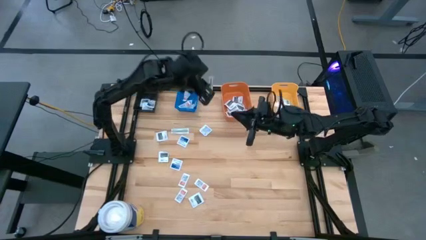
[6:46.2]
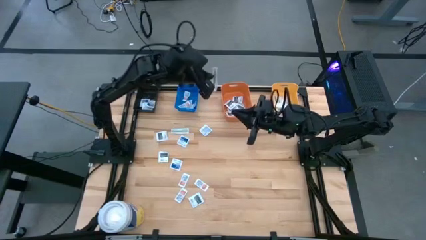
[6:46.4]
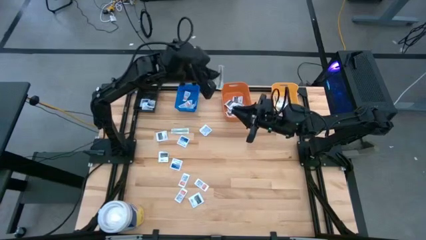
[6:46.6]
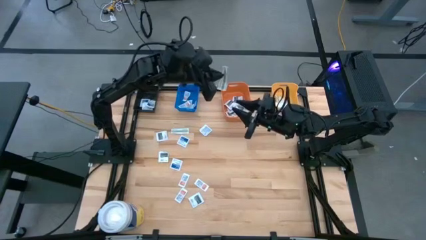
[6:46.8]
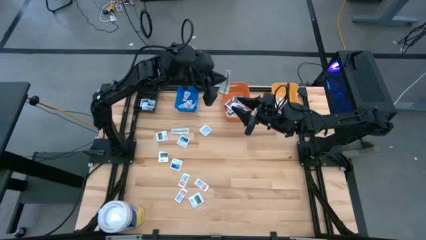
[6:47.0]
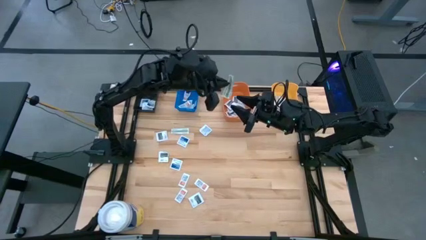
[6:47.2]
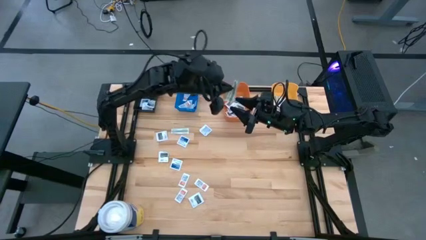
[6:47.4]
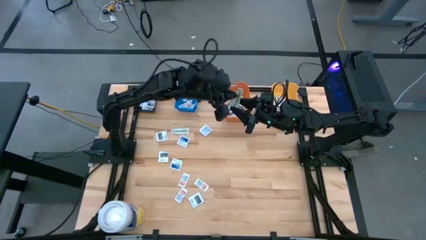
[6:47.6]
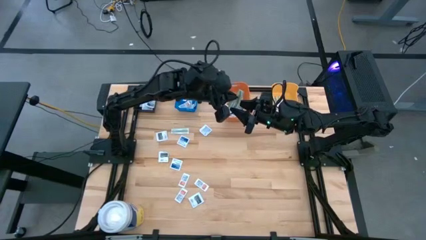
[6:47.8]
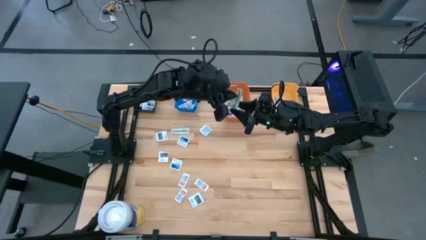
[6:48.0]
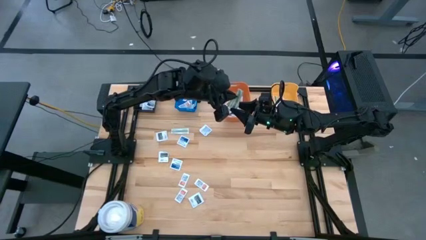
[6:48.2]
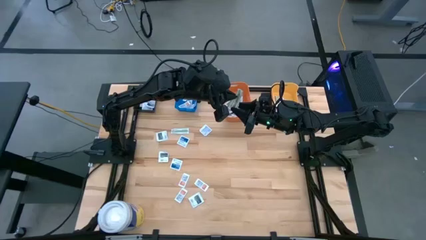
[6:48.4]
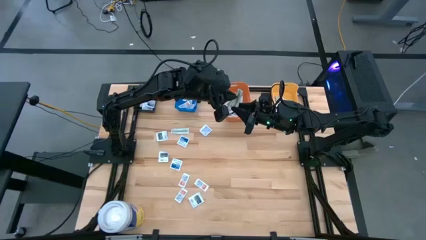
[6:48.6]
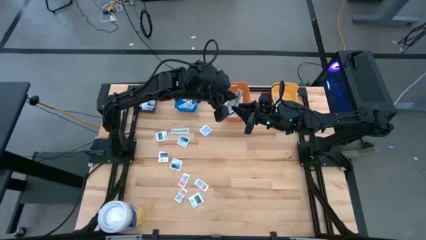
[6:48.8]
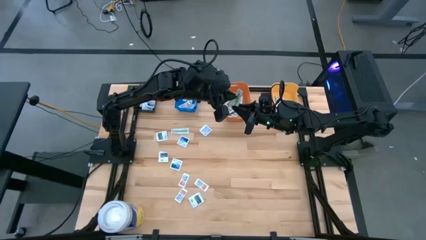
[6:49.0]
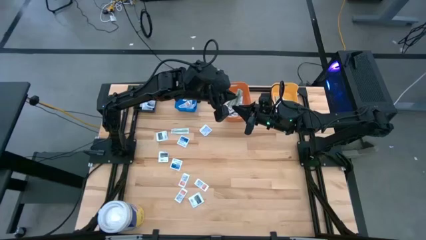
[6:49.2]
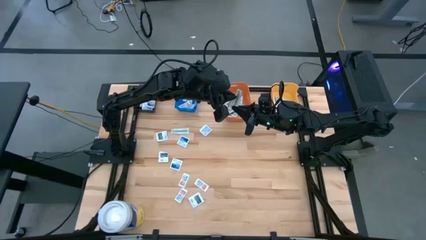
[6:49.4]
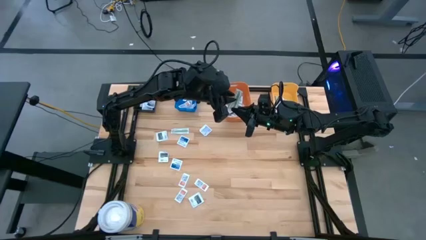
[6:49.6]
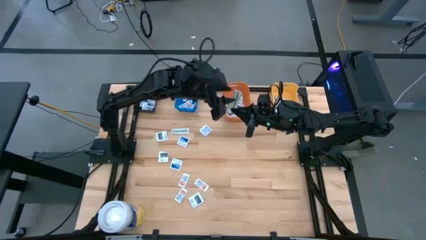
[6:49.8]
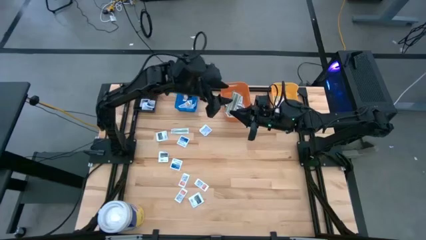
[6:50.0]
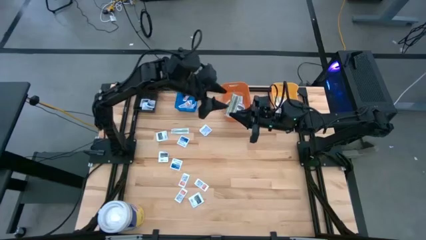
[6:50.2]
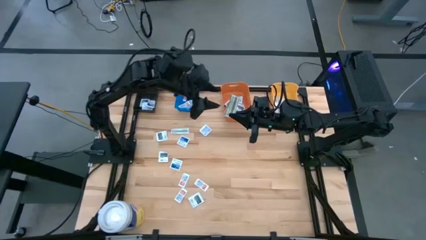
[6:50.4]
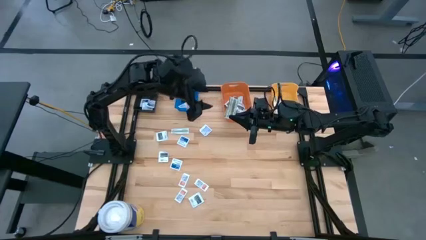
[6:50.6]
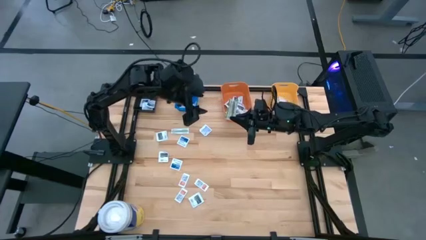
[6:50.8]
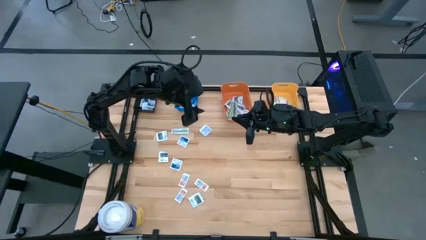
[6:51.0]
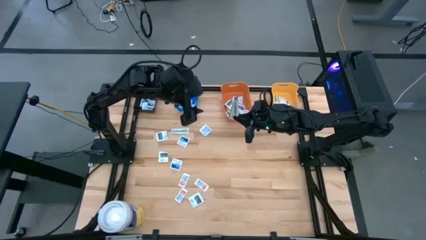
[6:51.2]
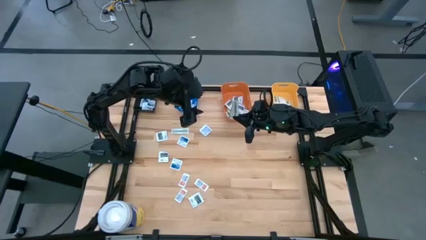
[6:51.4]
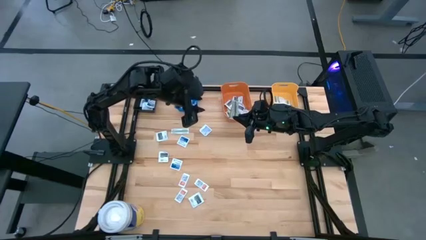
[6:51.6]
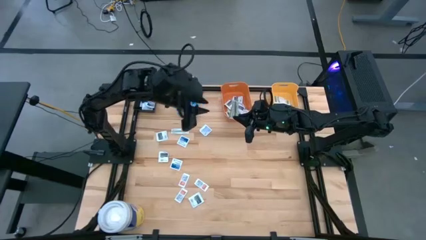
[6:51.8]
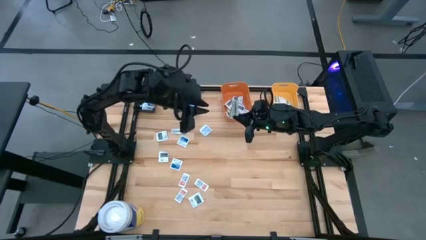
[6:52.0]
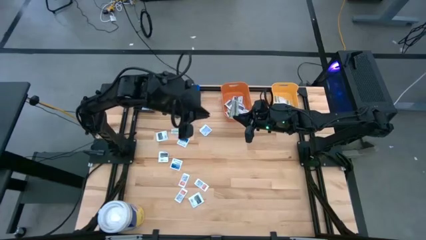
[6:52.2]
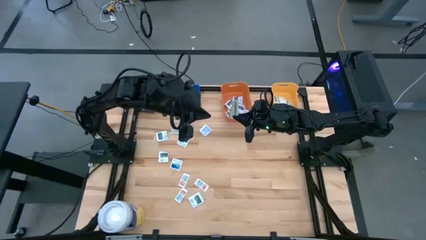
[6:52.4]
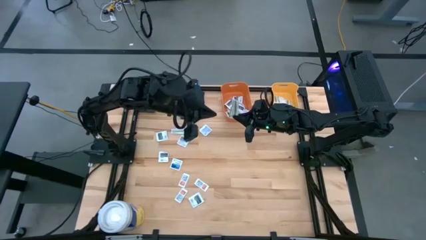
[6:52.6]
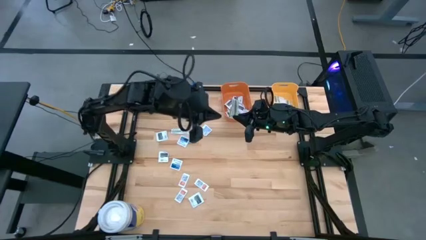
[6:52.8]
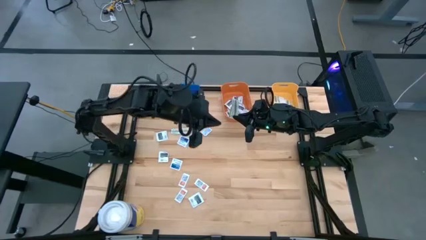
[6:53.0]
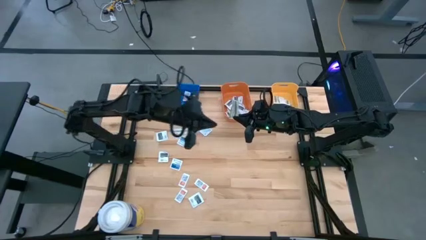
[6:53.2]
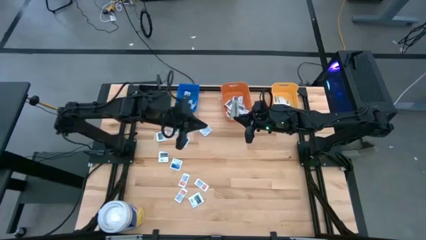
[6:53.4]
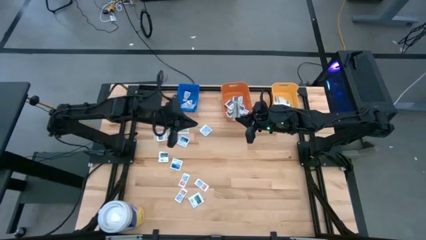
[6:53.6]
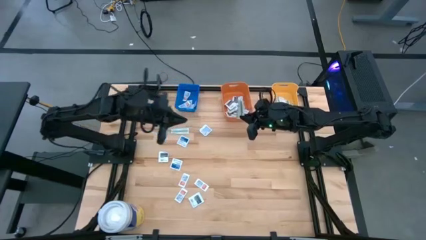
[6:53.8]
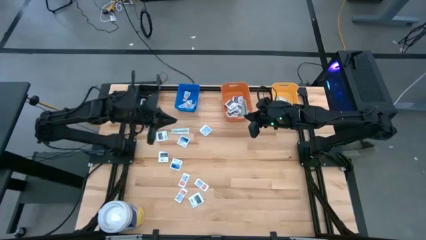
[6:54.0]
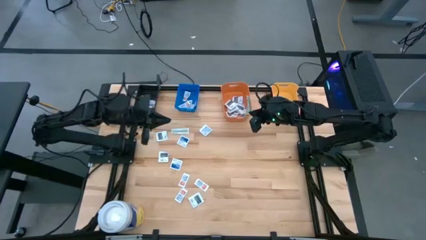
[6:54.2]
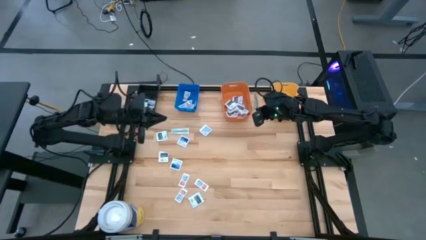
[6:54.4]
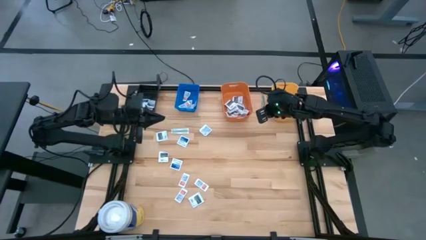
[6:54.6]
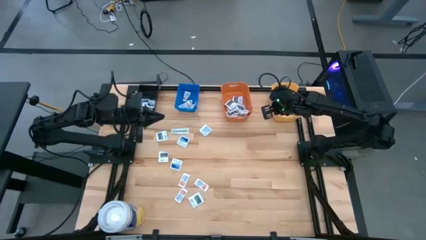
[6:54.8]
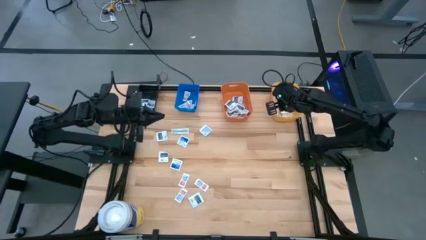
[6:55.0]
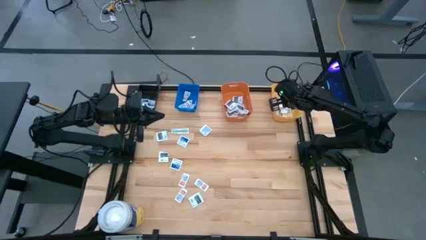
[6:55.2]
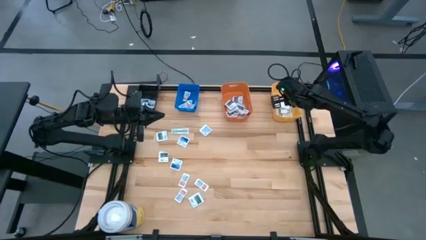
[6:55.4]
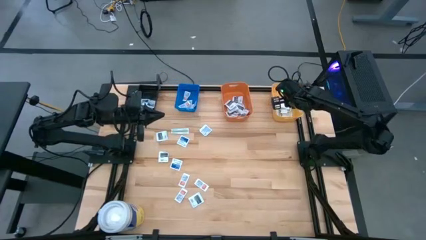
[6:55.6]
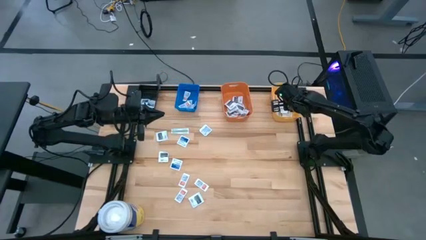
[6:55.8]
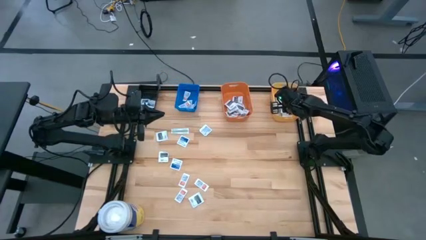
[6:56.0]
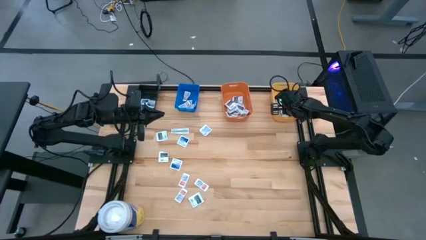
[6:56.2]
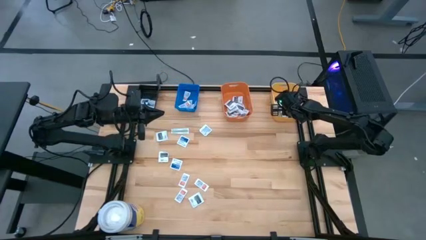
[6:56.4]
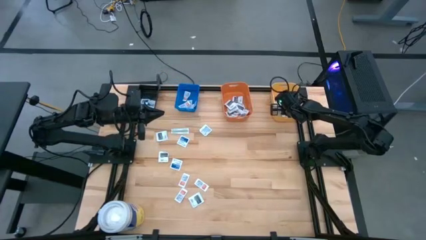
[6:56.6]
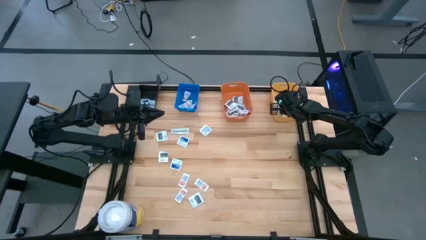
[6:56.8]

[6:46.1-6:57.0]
Task: Pick & Place First Aid Supplies
Put the bandage into the yellow bin

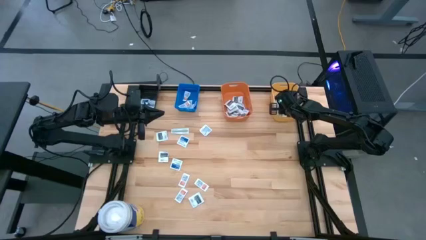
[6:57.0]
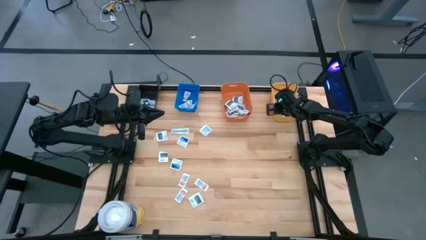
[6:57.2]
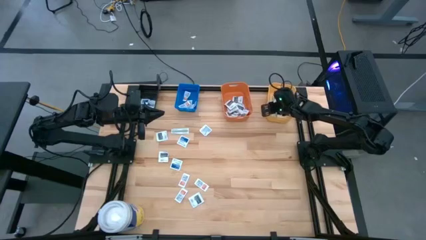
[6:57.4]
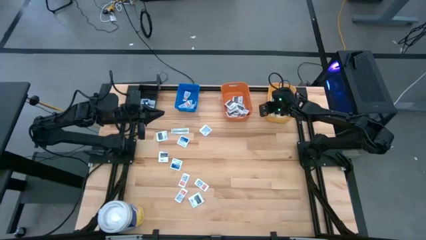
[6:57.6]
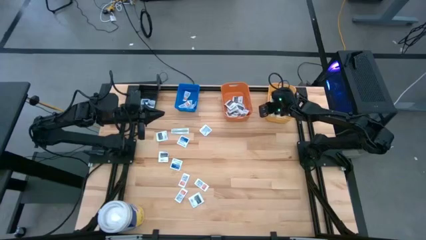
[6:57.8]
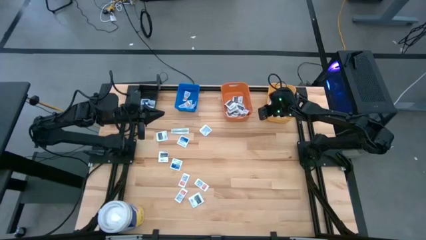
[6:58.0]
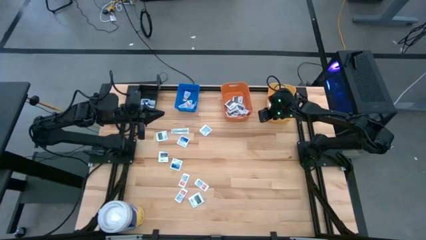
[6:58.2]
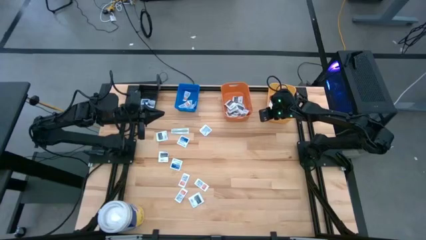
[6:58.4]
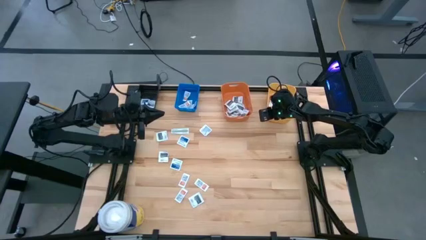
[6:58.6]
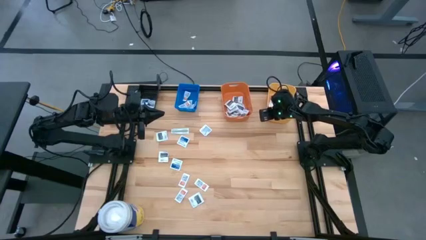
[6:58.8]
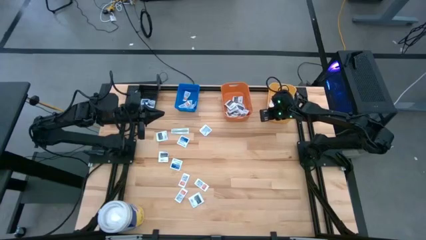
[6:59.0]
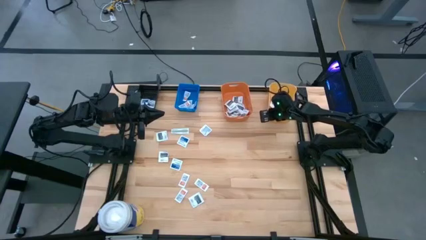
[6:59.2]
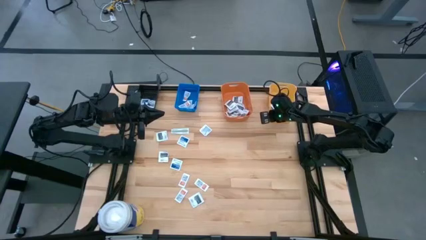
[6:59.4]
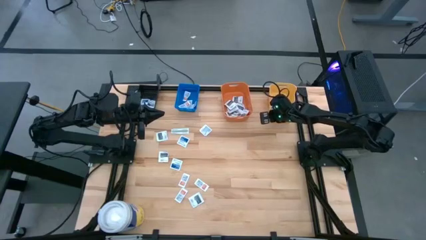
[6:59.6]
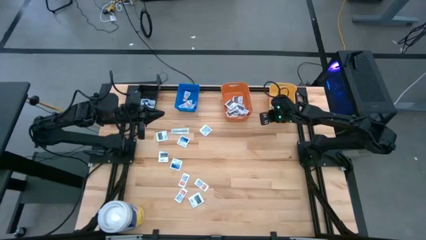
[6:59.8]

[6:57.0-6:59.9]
Adjust the yellow bin

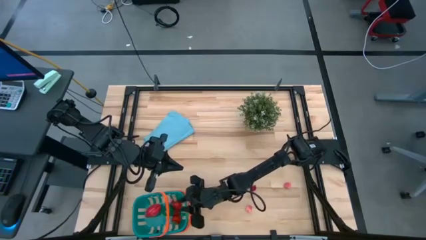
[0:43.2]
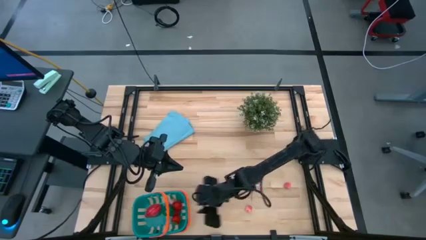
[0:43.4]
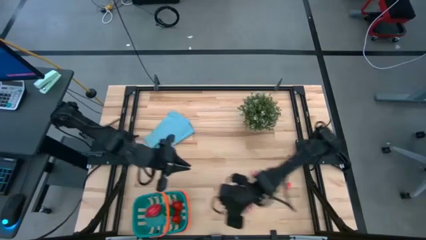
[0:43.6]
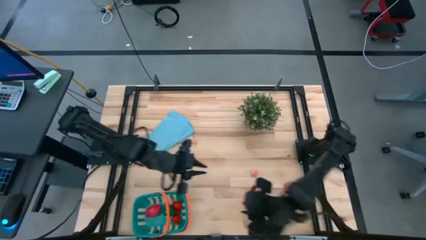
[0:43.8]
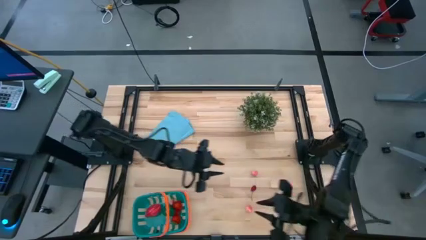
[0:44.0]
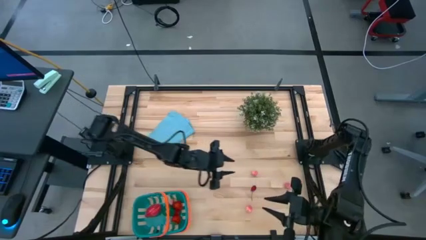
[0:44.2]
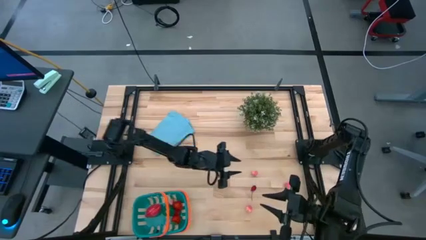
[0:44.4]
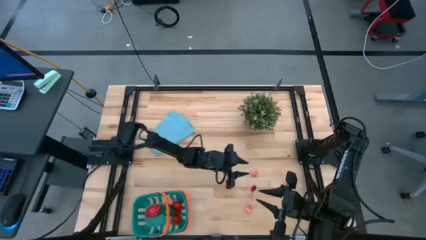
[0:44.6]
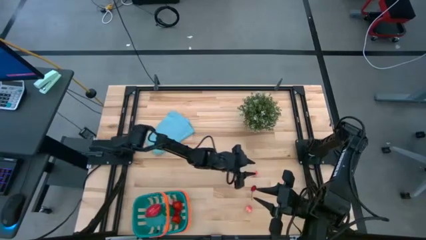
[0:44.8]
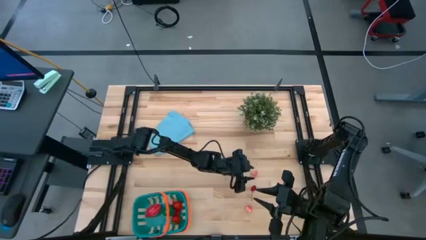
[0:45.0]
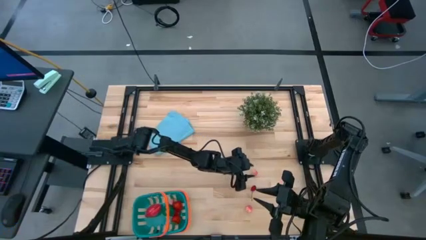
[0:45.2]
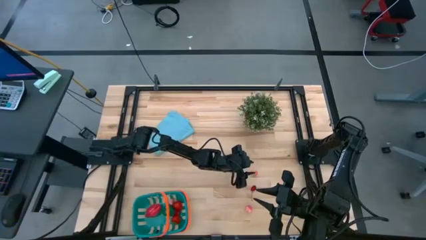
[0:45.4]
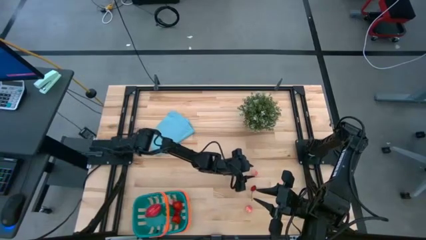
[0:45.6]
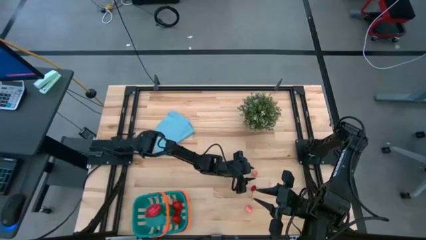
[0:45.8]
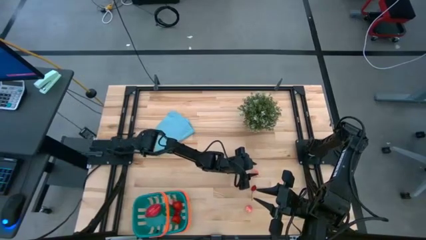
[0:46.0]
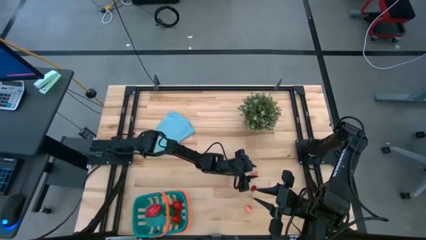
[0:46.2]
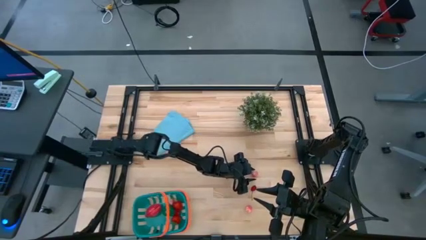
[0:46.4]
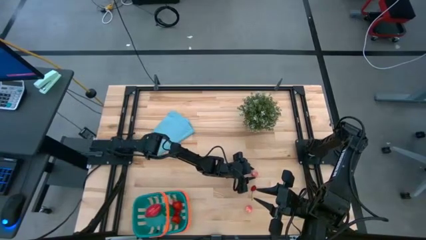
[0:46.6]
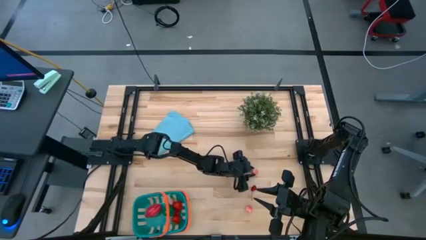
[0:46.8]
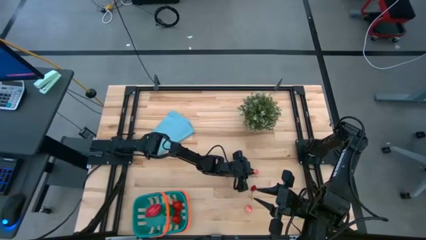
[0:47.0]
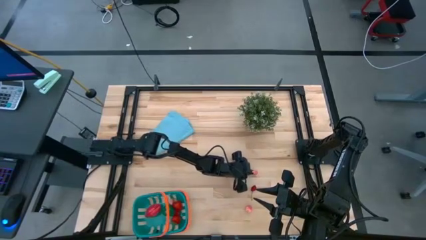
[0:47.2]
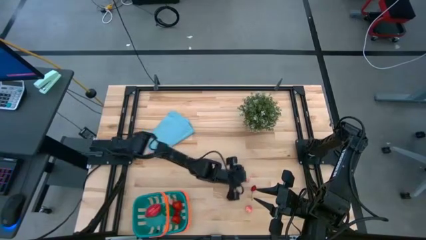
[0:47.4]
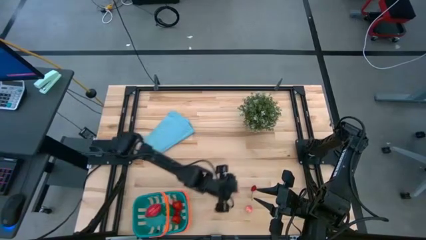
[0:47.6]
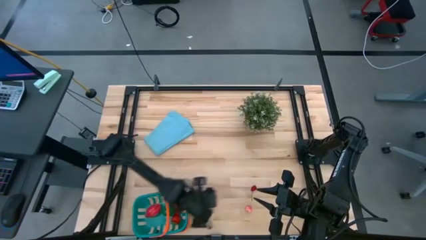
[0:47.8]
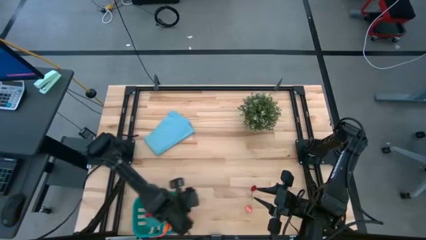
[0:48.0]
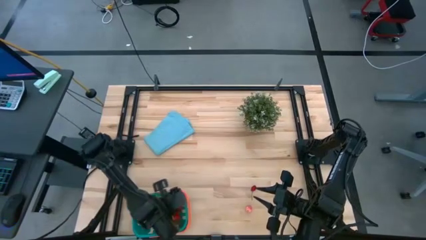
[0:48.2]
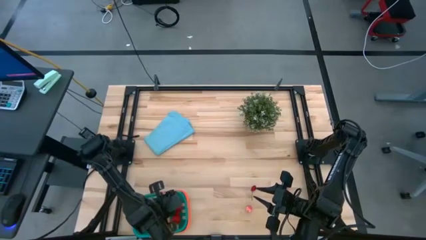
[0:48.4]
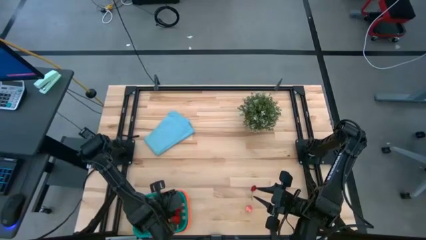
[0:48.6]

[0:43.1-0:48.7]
Task: Pick and placing Produce into tupperware
Put the pink peach into the blue basket
